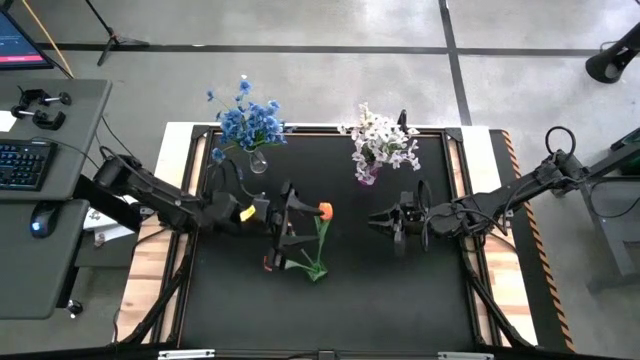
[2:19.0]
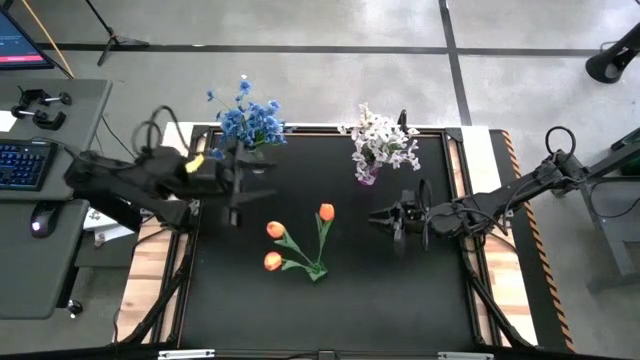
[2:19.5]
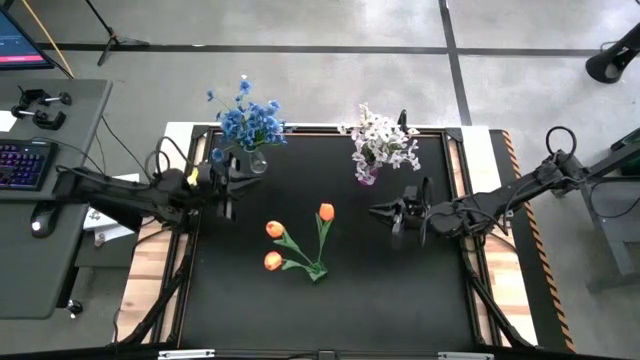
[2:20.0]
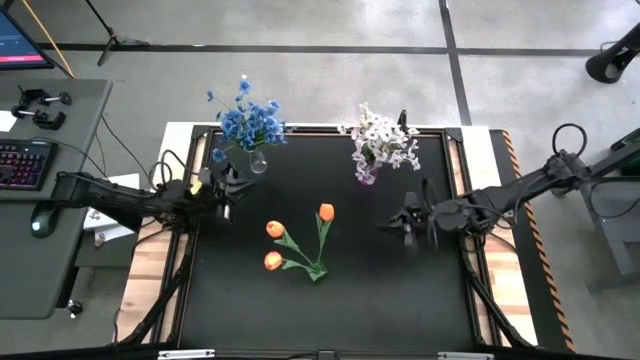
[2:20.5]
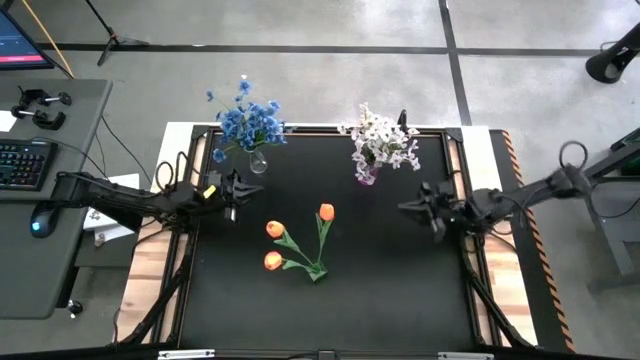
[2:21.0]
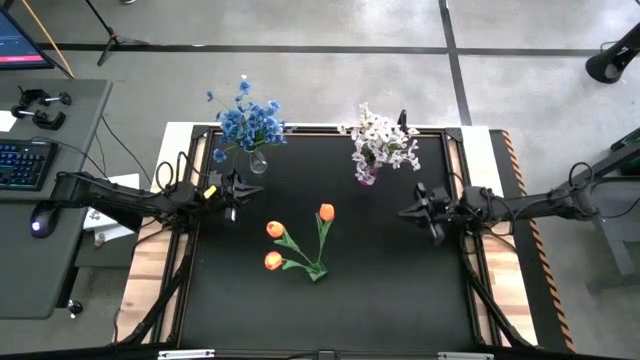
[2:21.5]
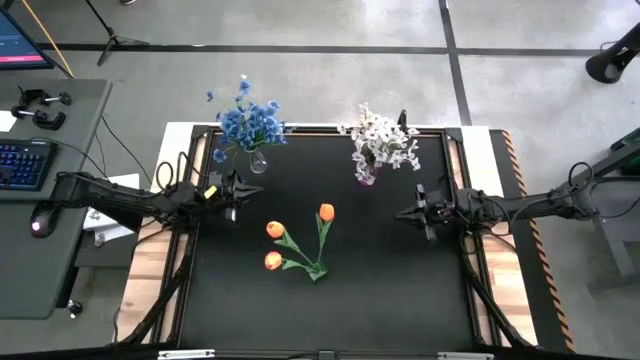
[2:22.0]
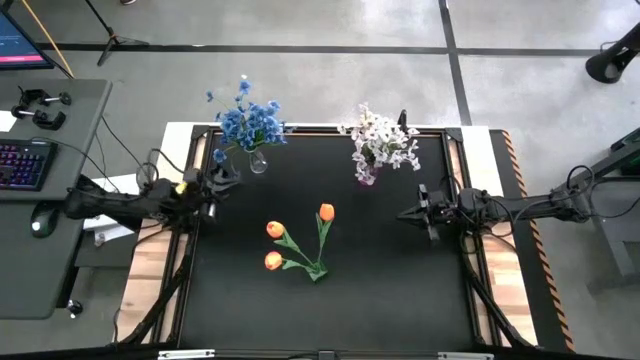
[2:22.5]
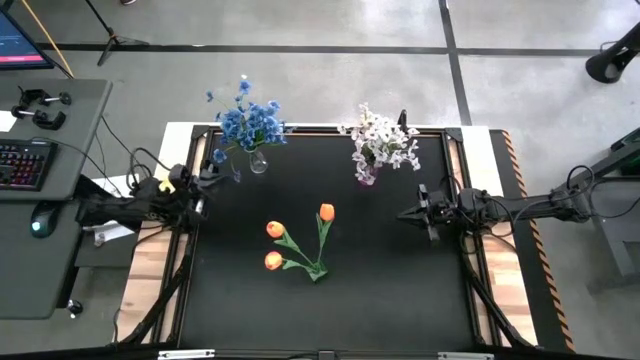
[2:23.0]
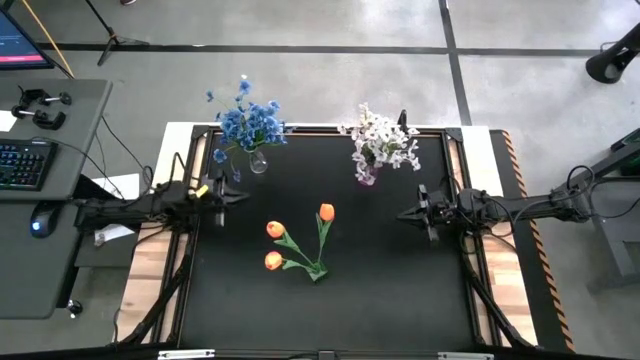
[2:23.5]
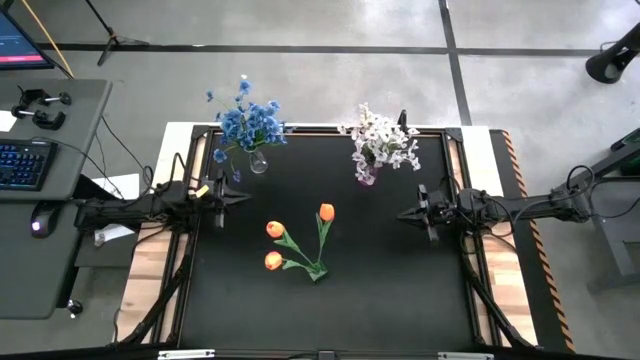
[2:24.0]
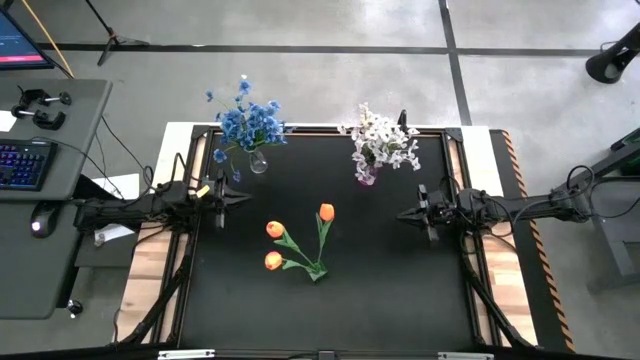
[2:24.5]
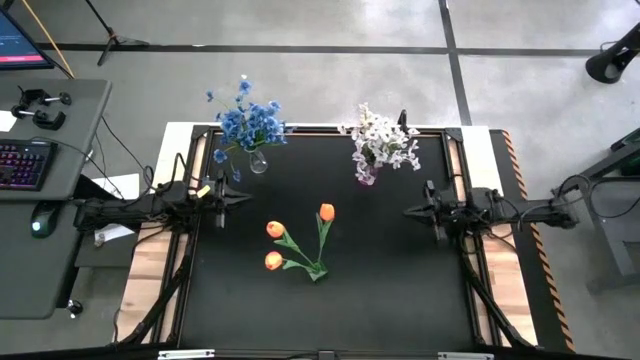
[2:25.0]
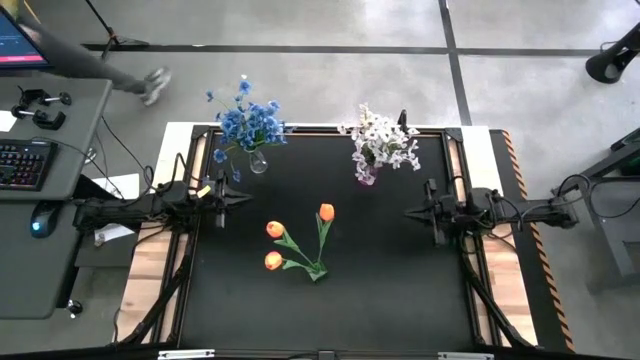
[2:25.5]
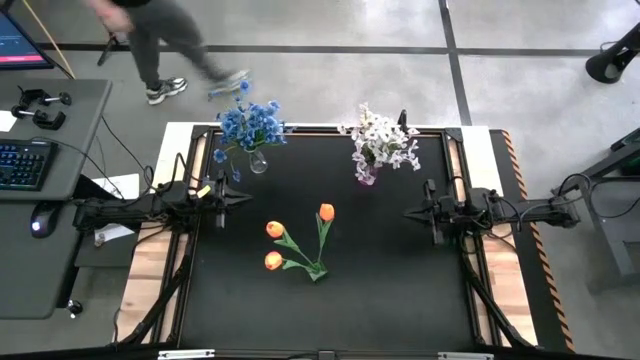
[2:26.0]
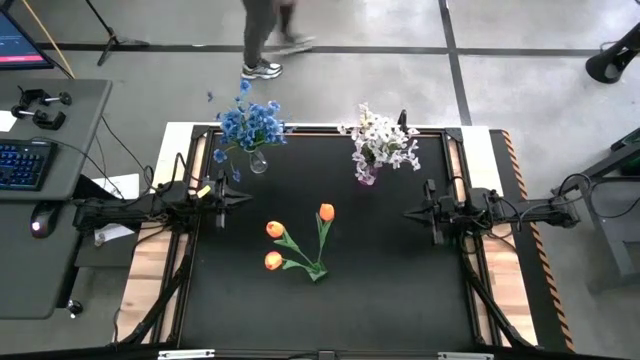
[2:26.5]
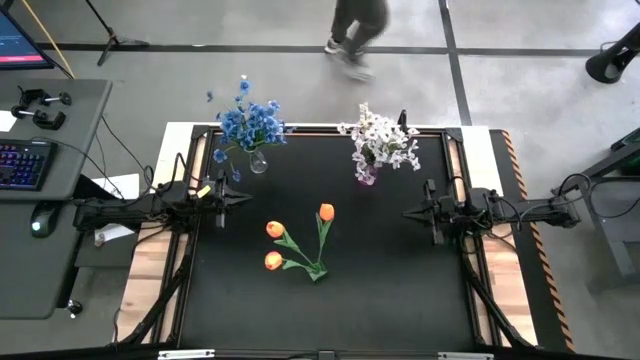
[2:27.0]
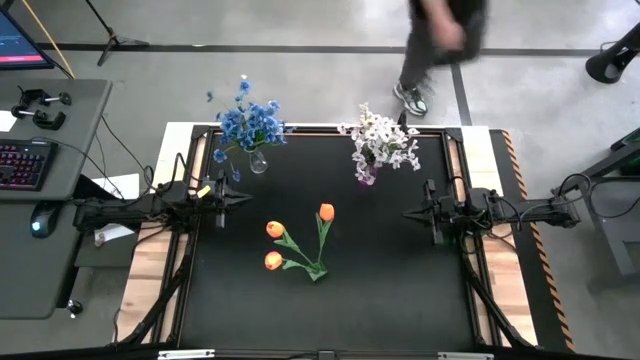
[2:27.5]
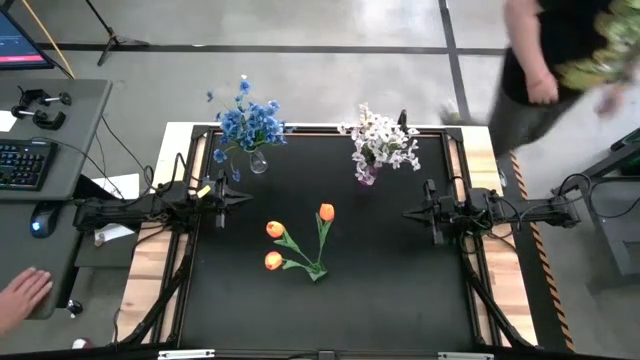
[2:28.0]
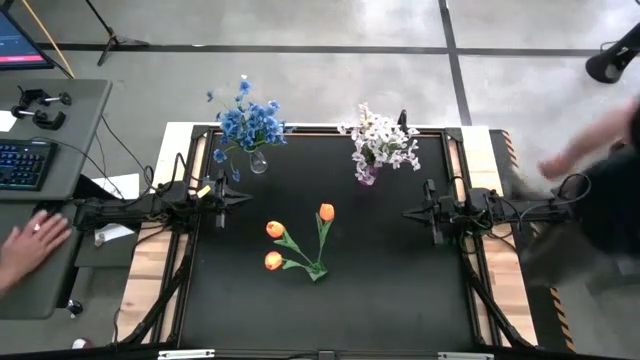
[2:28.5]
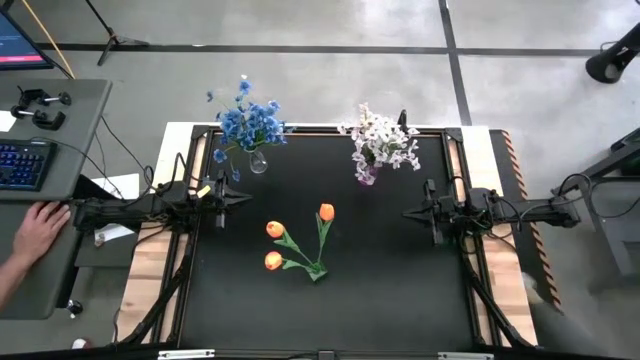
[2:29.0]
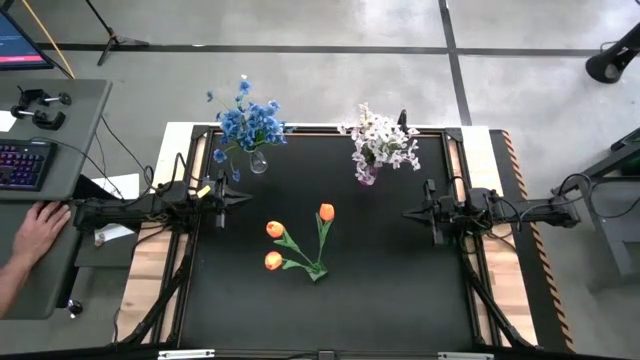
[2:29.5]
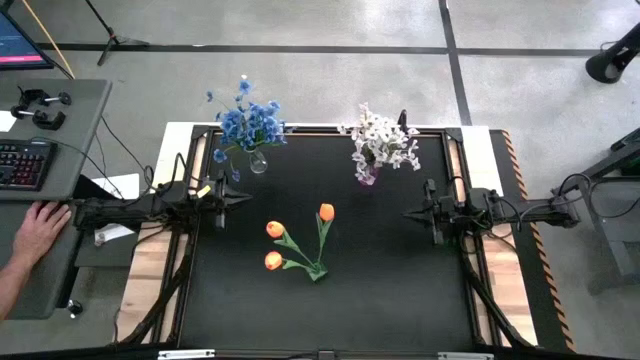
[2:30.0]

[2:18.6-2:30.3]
Task: Sort flowers into vase by color
Return to Home Position

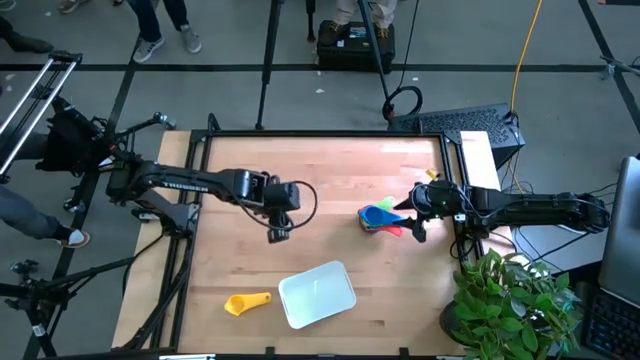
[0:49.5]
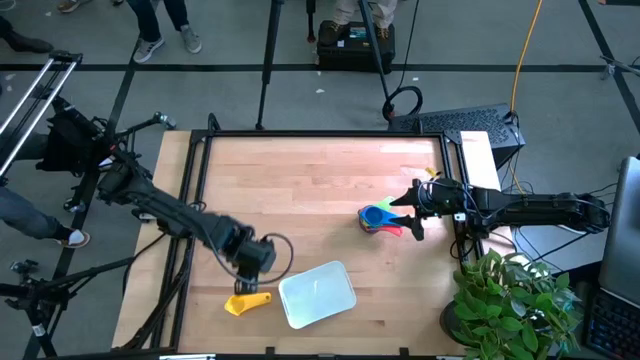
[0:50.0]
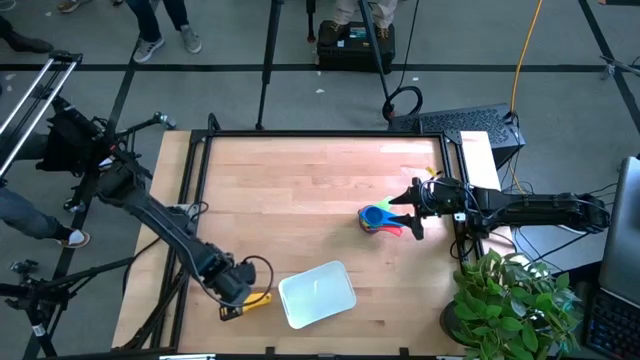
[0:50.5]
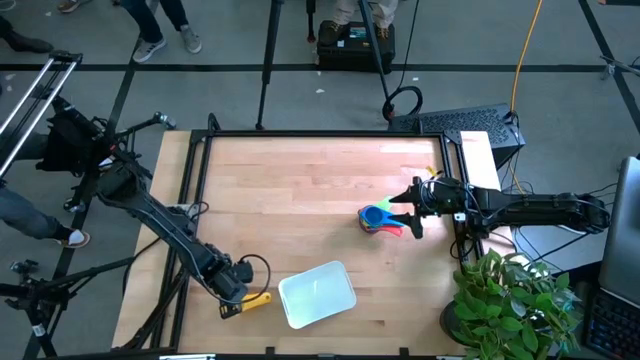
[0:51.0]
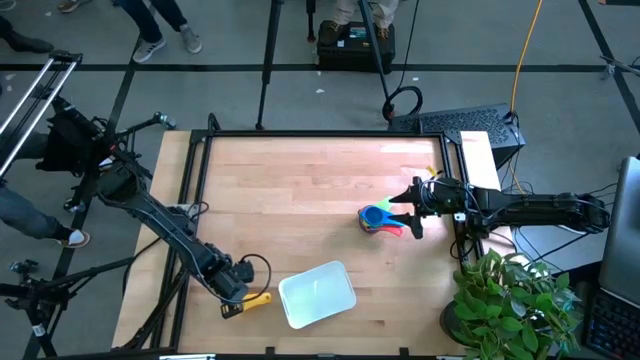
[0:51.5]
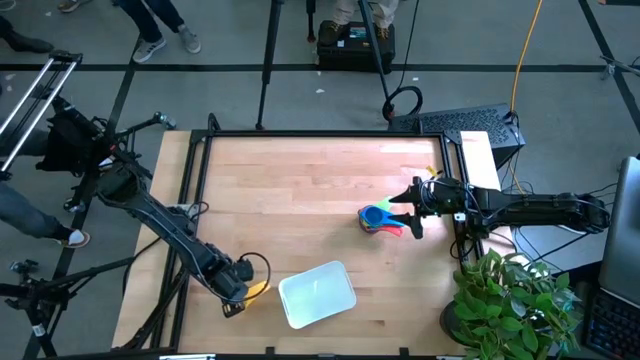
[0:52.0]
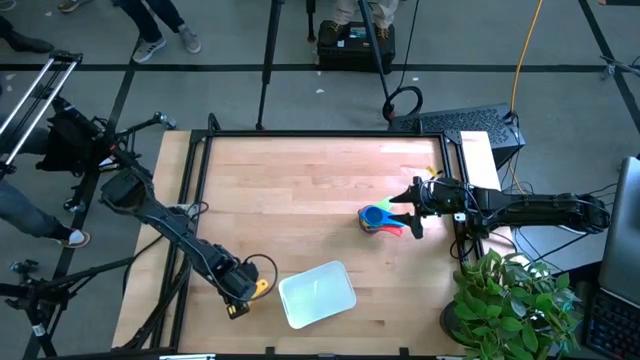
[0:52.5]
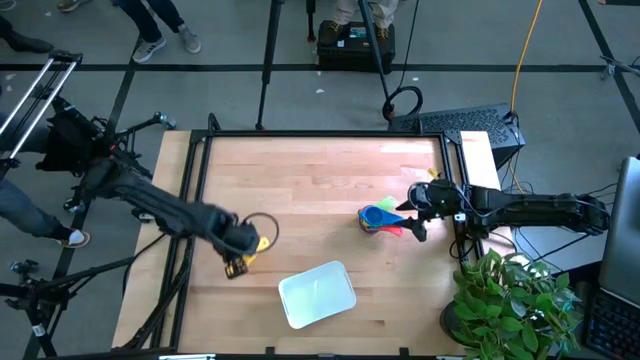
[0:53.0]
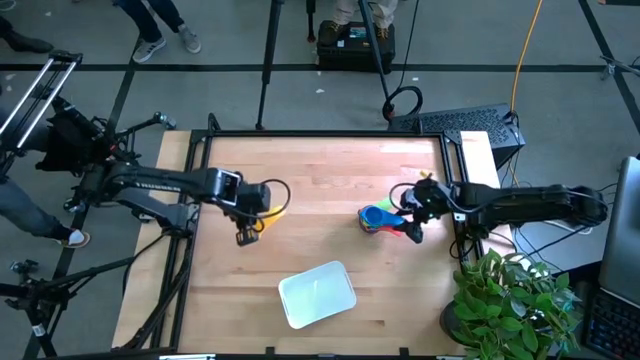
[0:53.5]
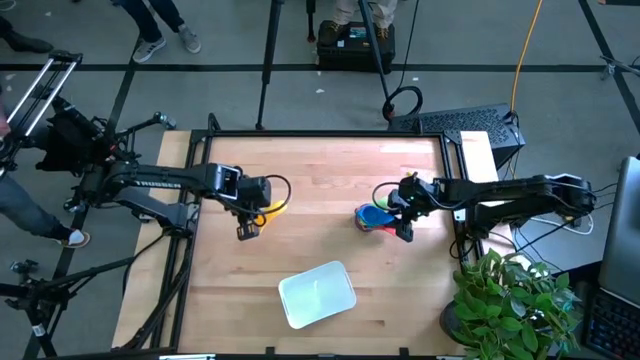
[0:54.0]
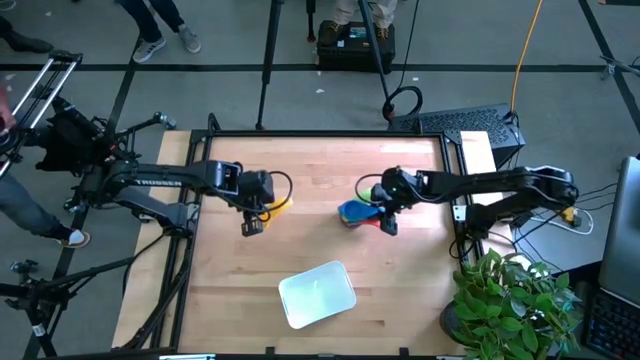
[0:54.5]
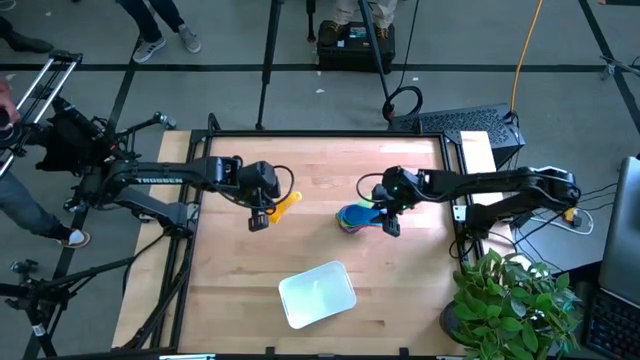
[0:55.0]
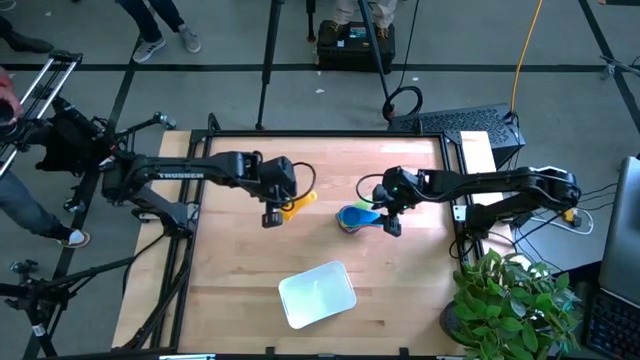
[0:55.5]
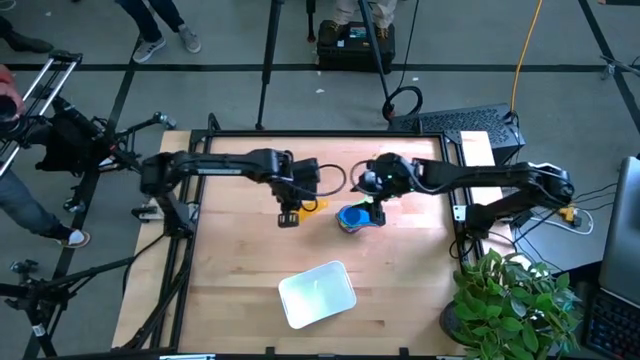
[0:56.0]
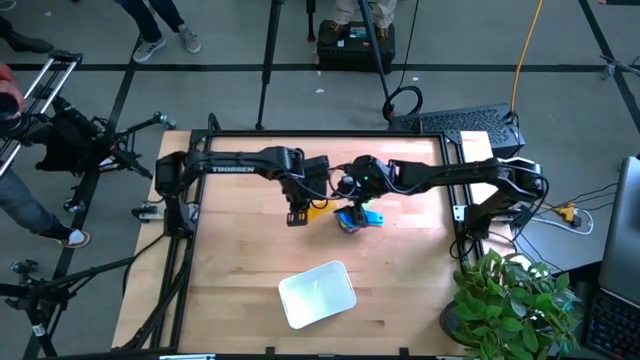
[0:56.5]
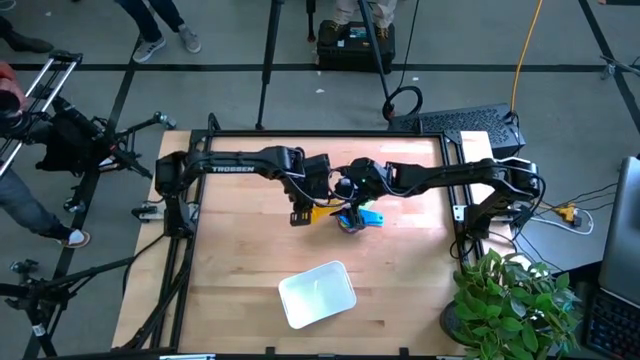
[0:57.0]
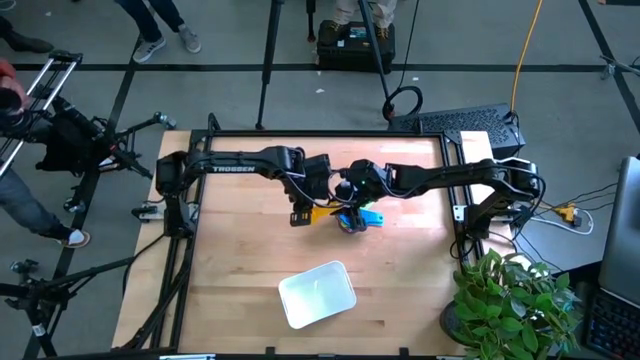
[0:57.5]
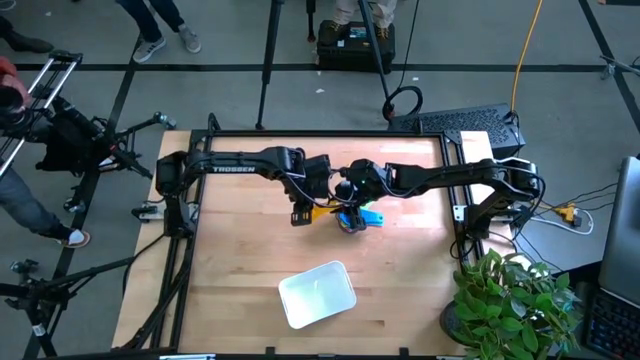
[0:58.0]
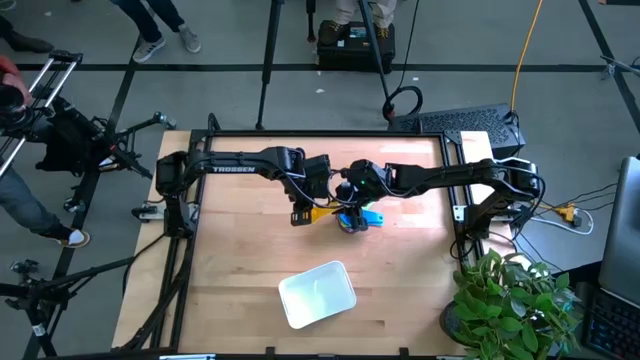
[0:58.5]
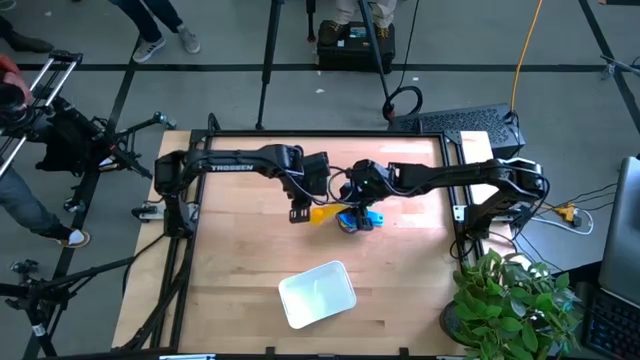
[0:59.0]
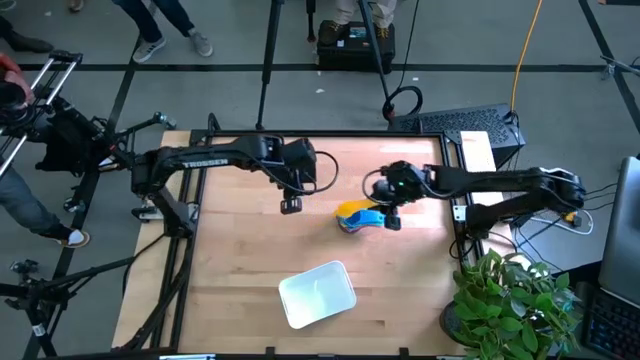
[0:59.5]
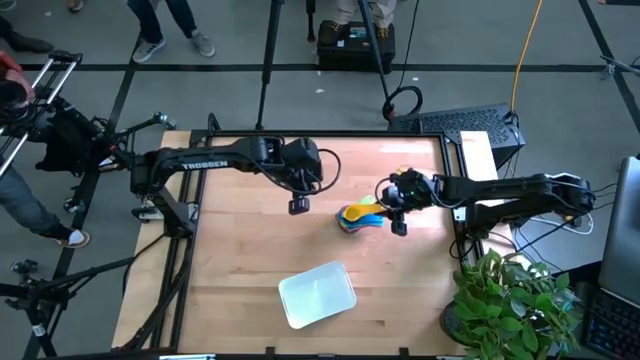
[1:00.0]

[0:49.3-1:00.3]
Task: Nest measuring cups in basket
Stack the yellow measuring cup on the blue measuring cup
